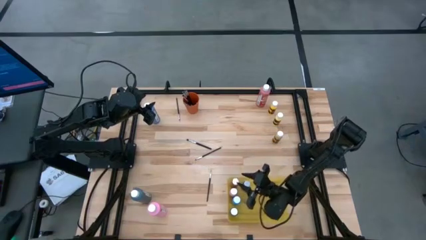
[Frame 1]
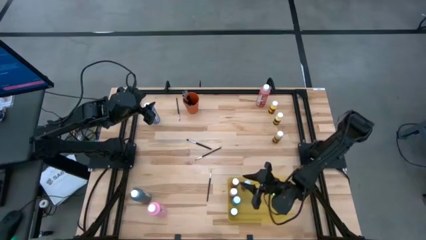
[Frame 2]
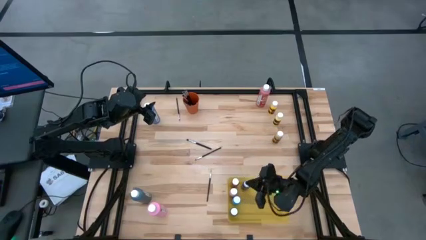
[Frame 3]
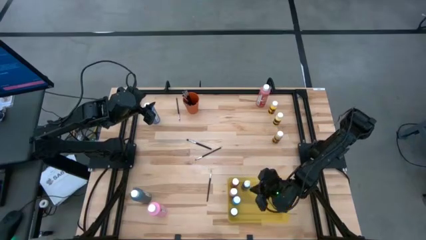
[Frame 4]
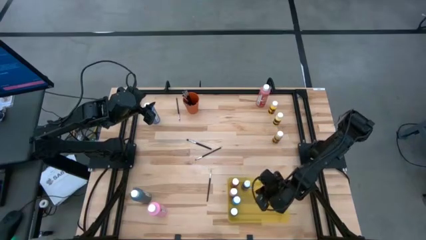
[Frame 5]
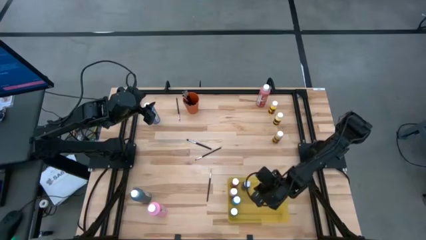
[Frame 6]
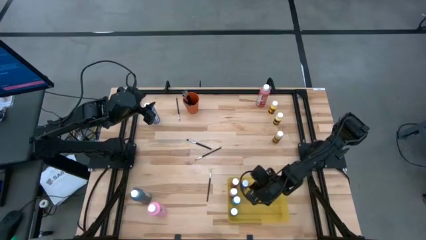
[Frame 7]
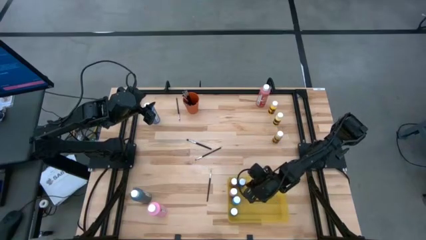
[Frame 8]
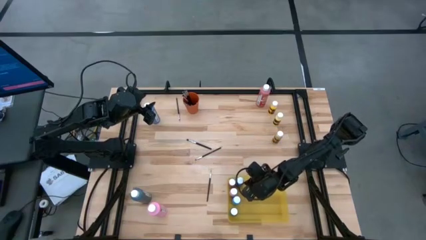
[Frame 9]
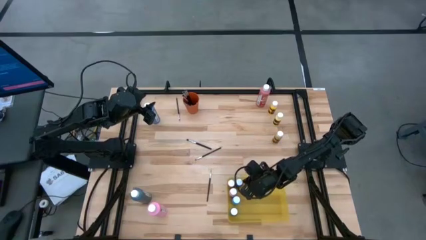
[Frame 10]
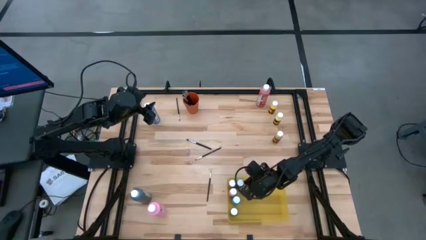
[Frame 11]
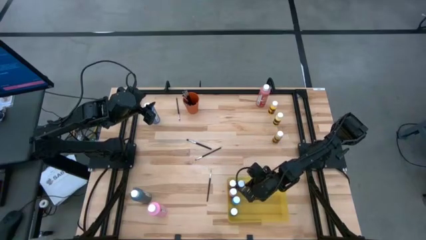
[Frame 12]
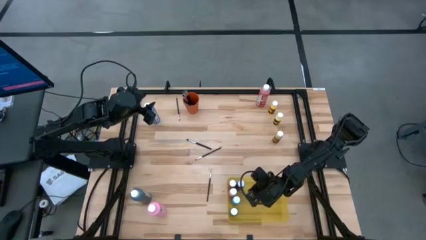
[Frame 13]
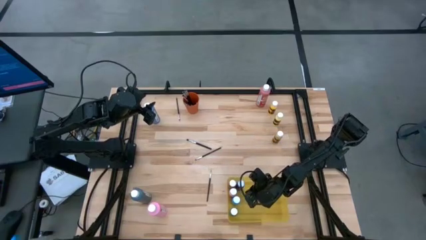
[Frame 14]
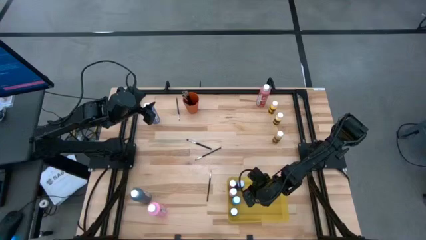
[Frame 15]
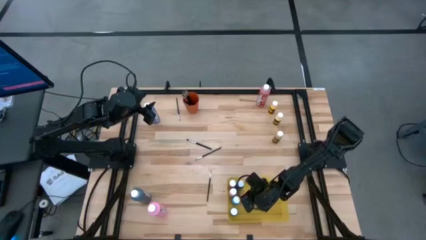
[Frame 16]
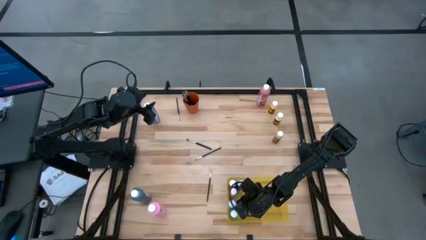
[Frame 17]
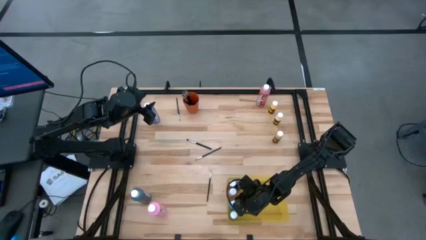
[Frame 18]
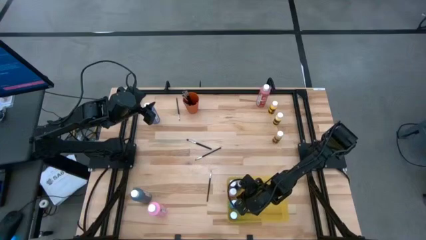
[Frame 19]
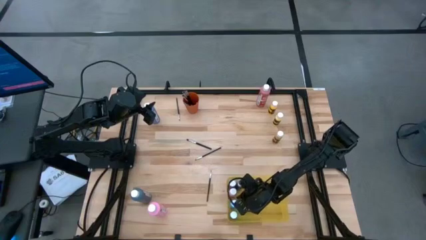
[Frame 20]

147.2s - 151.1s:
Task: Pick & Place Paint Supplies
Adjust the paint bottles in the transparent bin

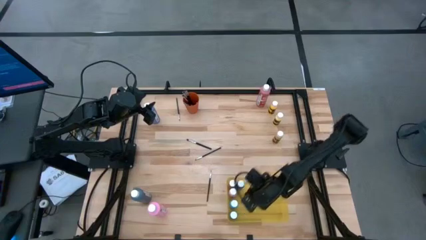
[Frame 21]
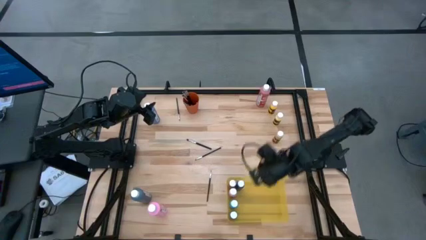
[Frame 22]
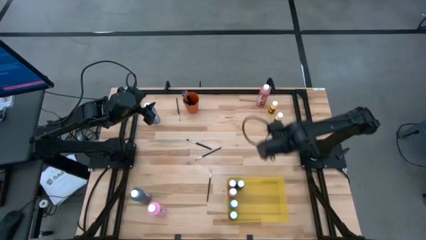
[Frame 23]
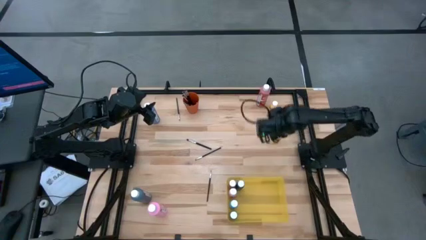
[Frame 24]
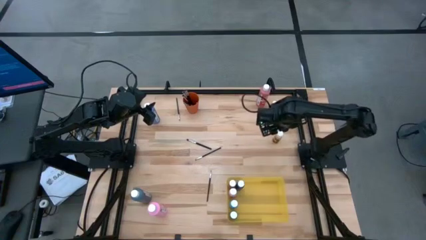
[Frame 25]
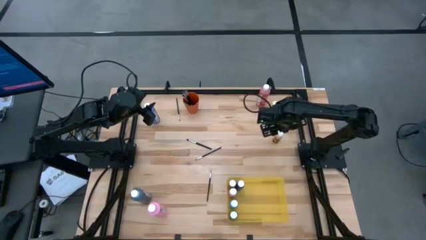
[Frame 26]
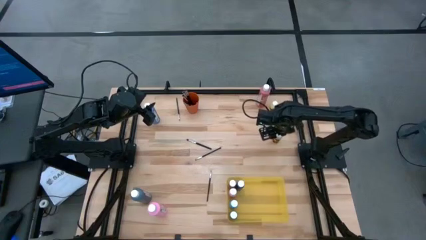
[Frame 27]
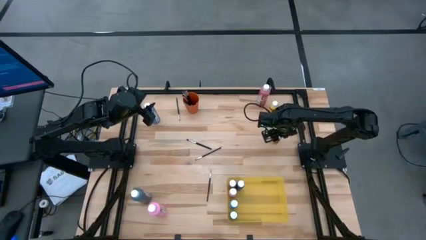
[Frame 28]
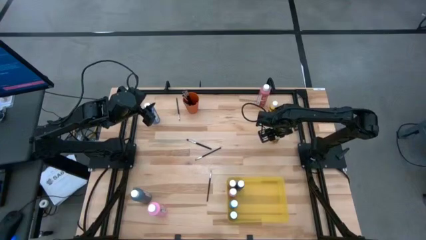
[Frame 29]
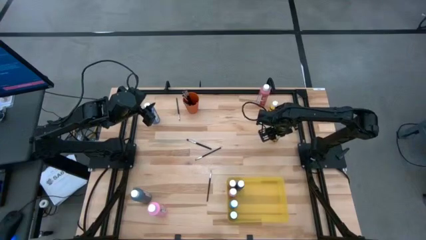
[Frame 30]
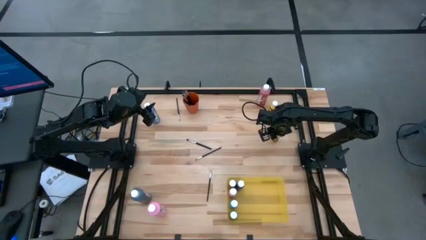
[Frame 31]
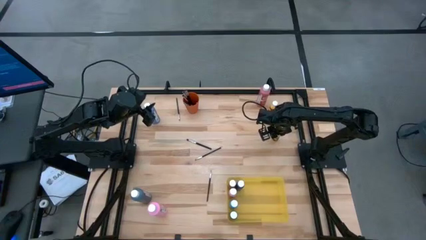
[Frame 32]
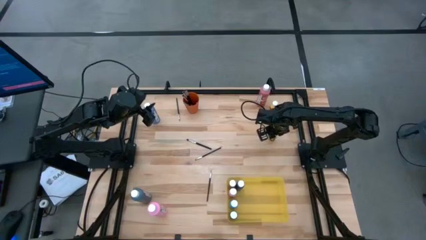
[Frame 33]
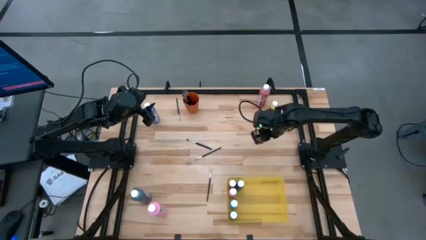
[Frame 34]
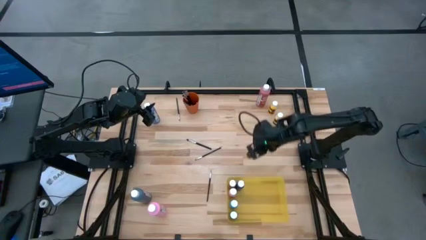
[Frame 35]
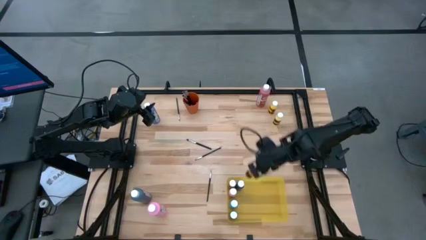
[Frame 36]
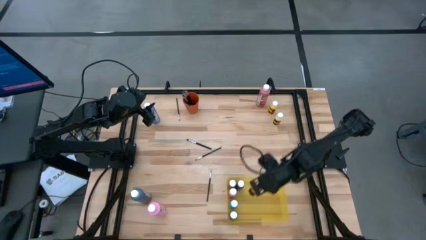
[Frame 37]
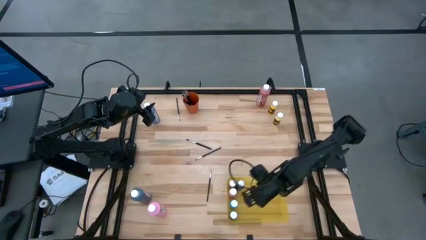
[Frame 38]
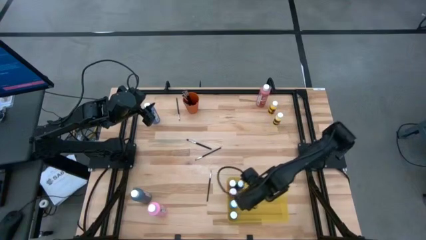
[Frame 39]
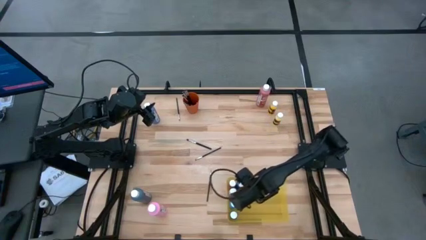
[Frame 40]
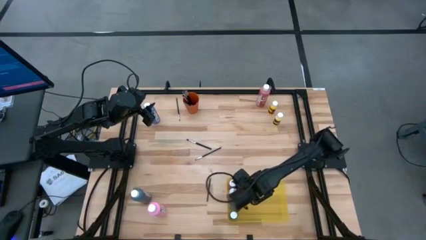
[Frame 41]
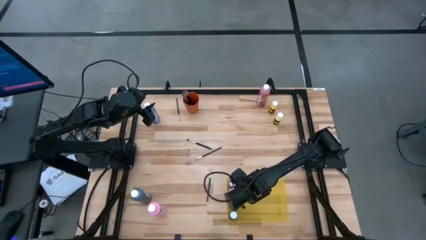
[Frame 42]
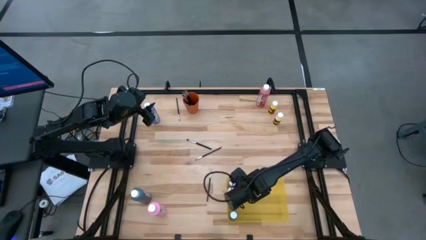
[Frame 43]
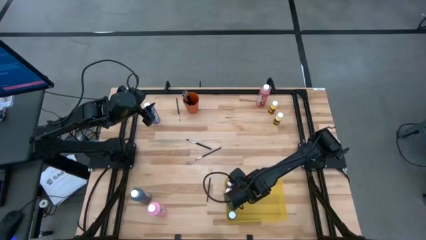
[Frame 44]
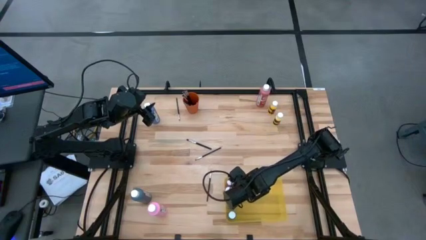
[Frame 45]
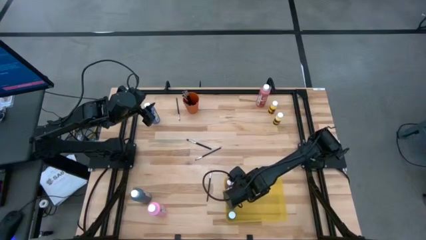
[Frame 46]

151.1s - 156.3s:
Put the yellow paint bottle into the yellow bin

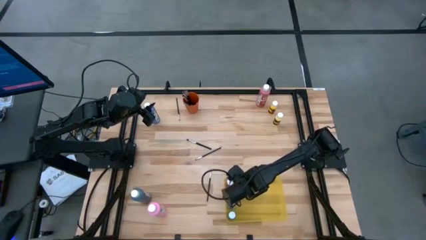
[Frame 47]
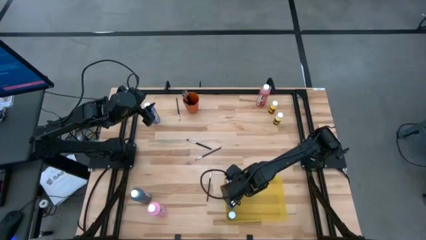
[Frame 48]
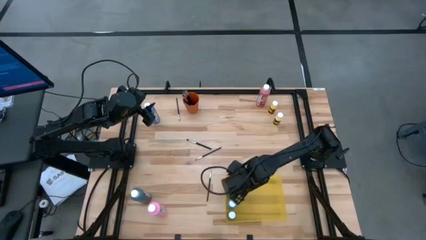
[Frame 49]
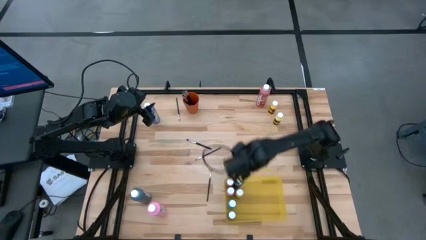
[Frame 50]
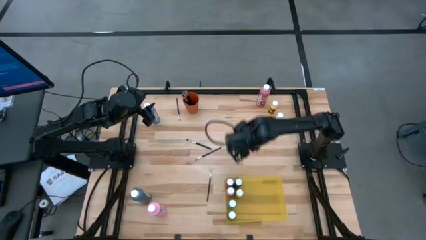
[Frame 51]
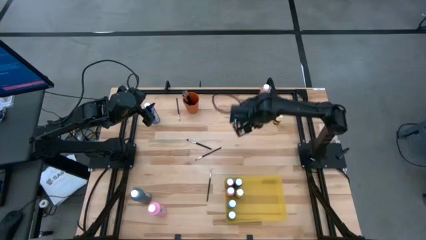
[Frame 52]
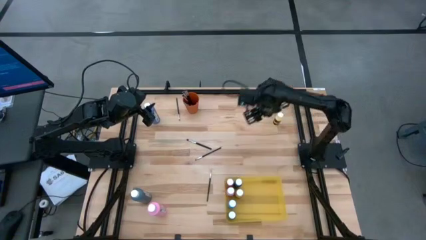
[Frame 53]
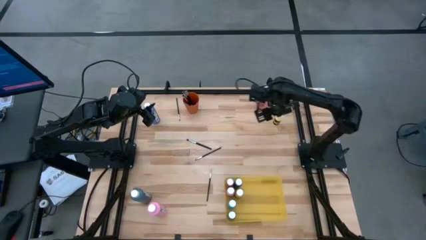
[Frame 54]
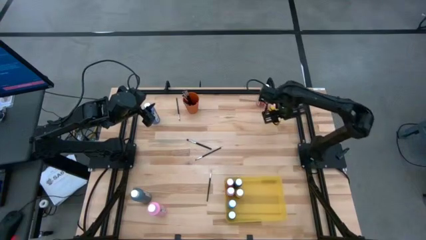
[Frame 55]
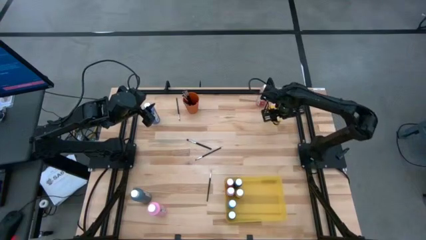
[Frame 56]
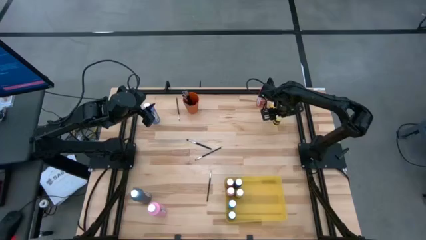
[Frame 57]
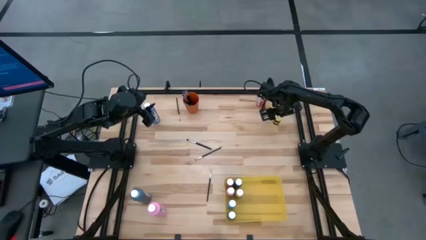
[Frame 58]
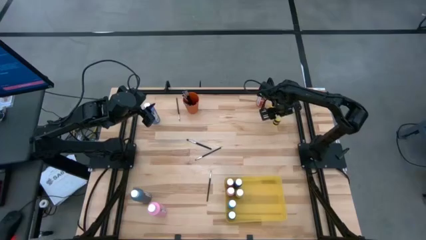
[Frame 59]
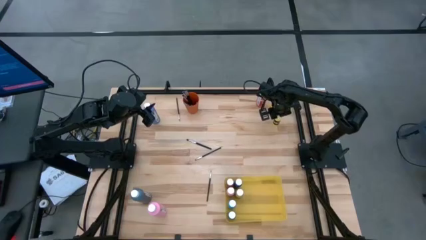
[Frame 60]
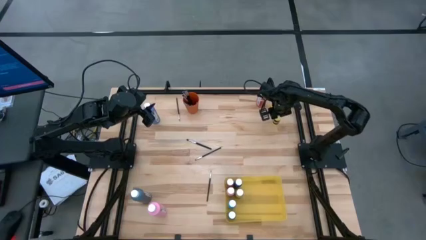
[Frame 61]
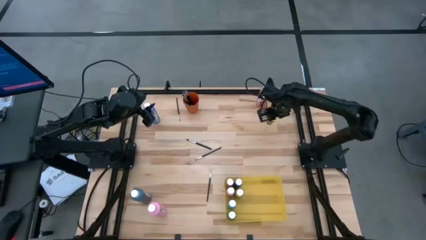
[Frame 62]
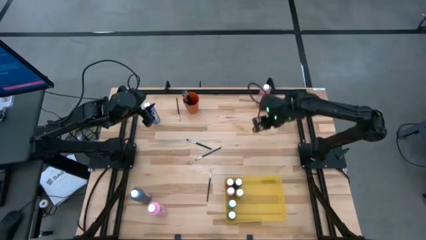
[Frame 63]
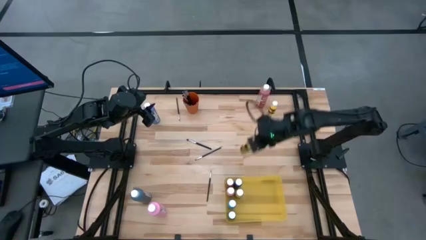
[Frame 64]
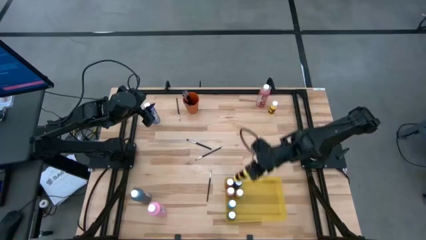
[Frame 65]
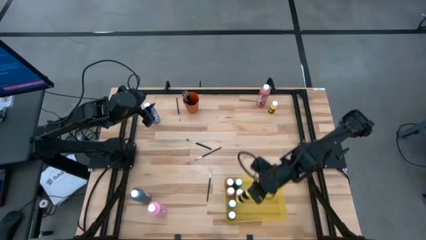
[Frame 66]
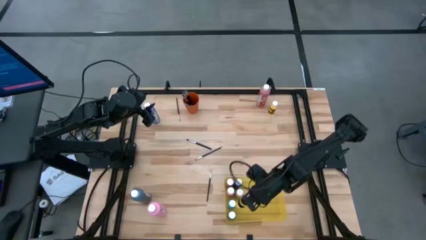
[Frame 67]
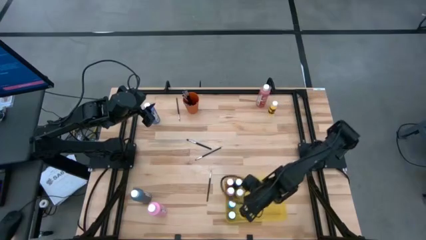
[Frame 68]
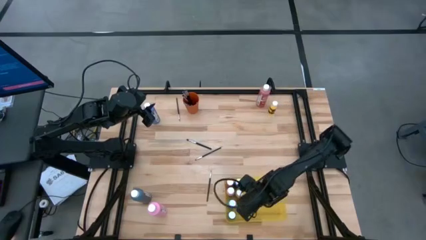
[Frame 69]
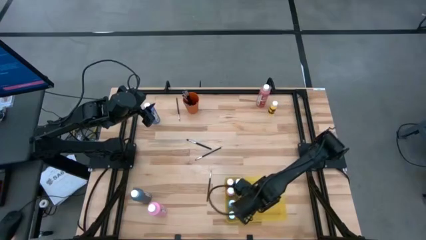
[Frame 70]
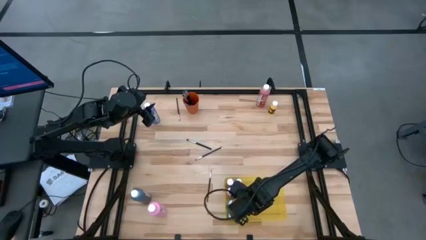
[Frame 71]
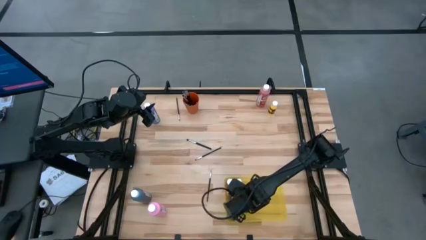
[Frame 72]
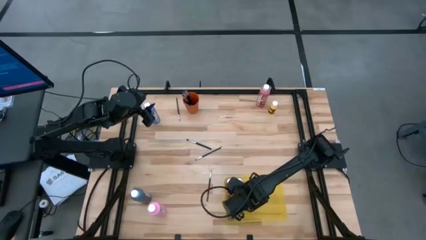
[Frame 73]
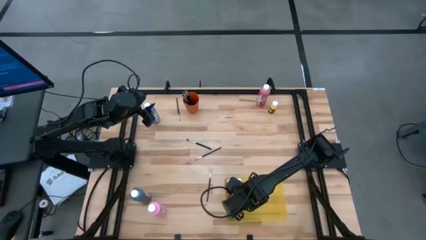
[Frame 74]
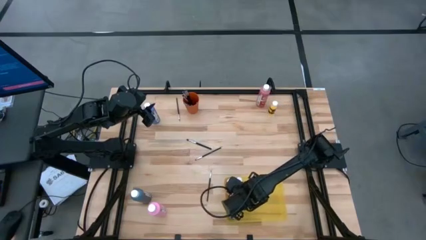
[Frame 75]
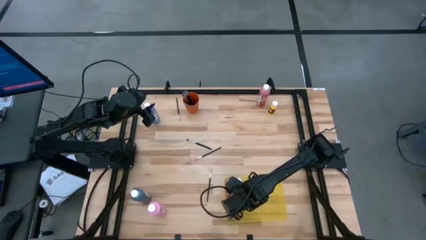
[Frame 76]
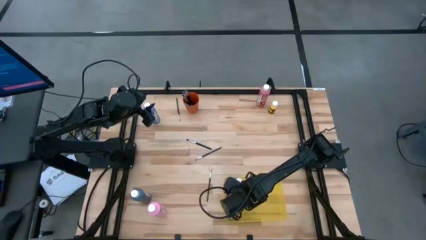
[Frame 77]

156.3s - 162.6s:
Put the yellow paint bottle into the yellow bin
